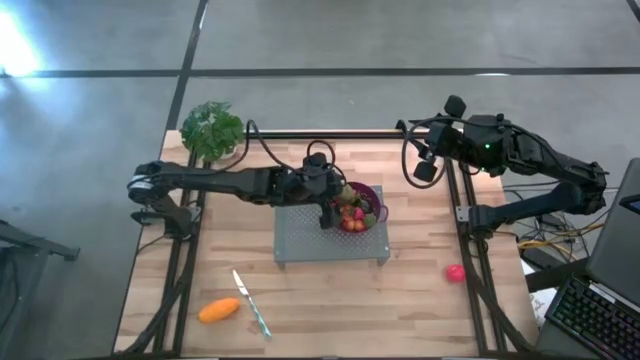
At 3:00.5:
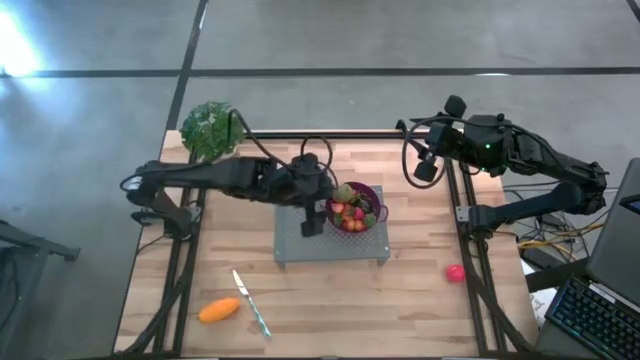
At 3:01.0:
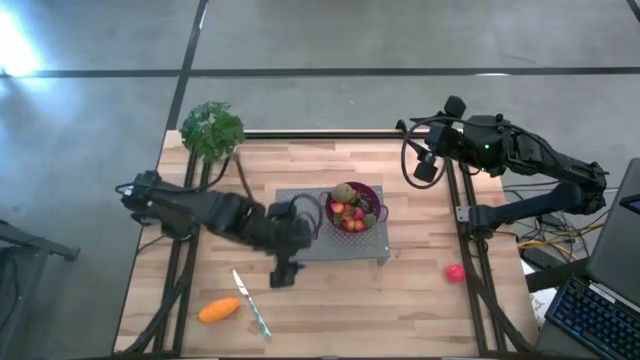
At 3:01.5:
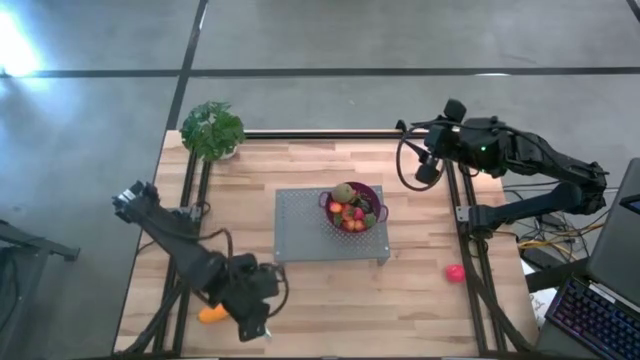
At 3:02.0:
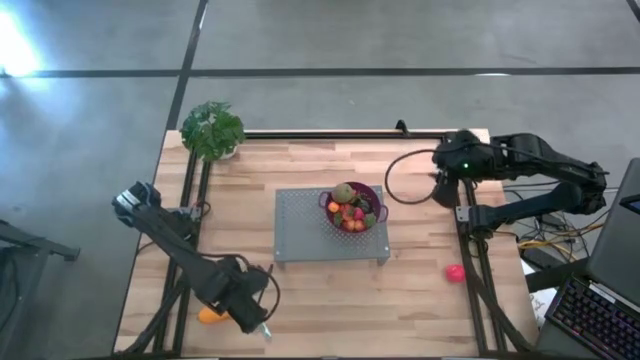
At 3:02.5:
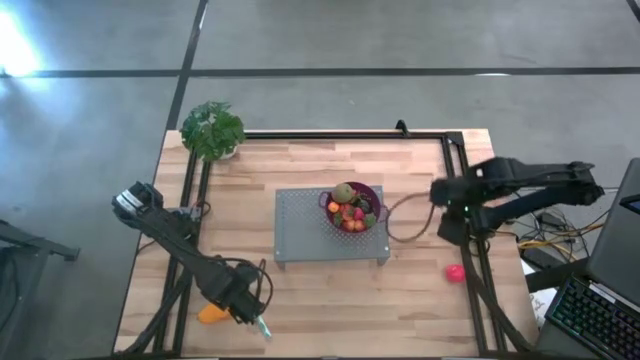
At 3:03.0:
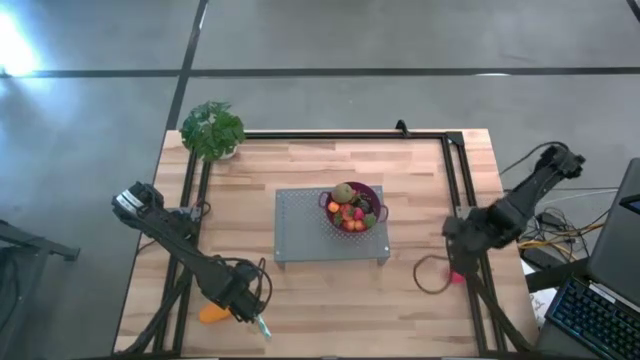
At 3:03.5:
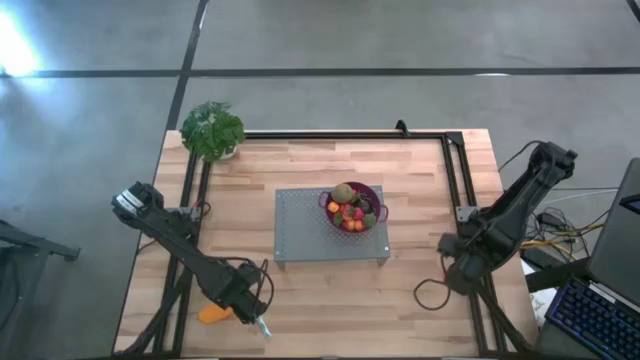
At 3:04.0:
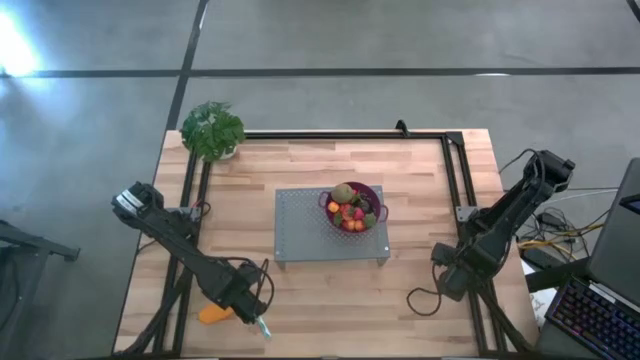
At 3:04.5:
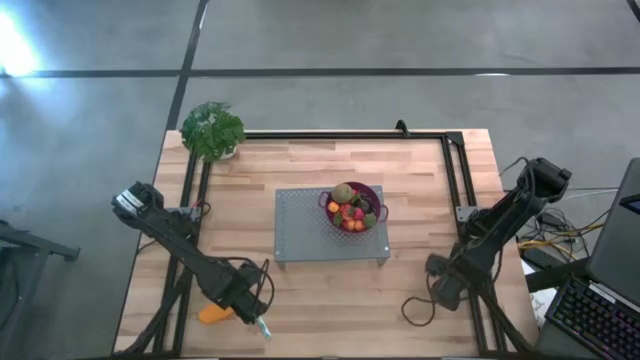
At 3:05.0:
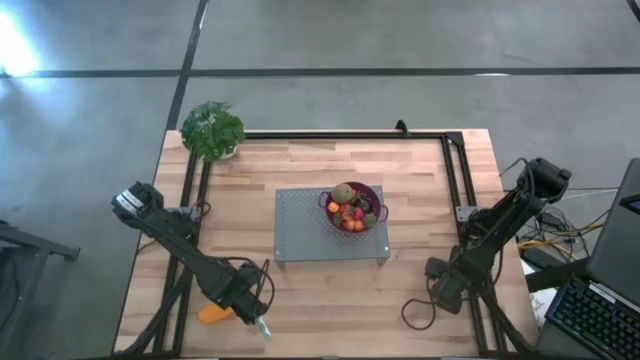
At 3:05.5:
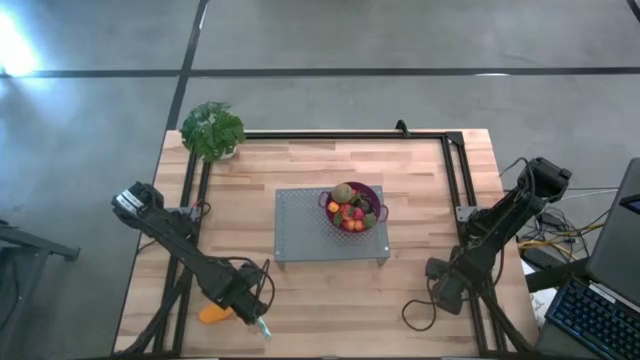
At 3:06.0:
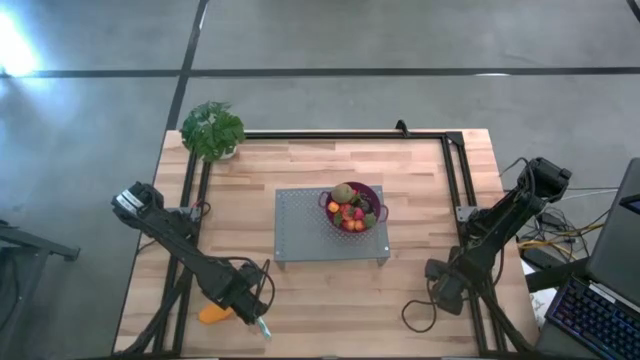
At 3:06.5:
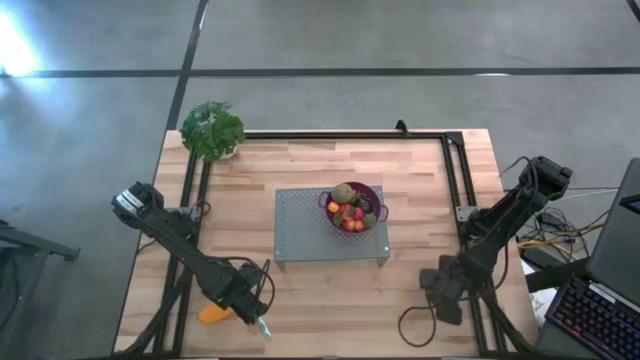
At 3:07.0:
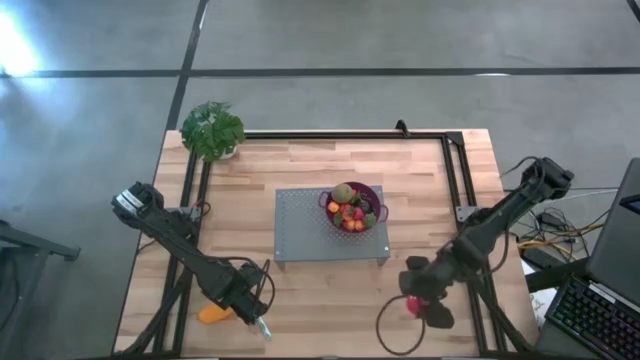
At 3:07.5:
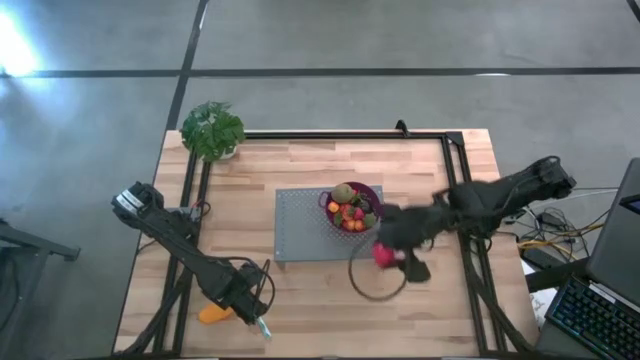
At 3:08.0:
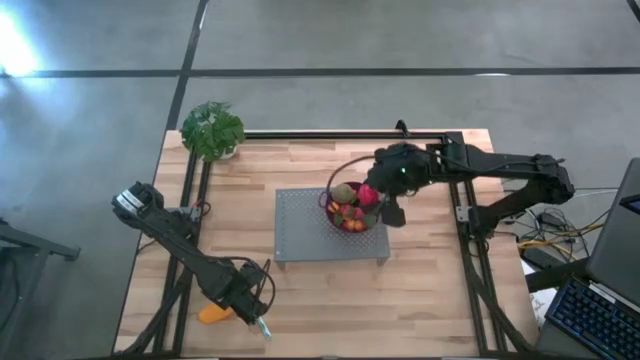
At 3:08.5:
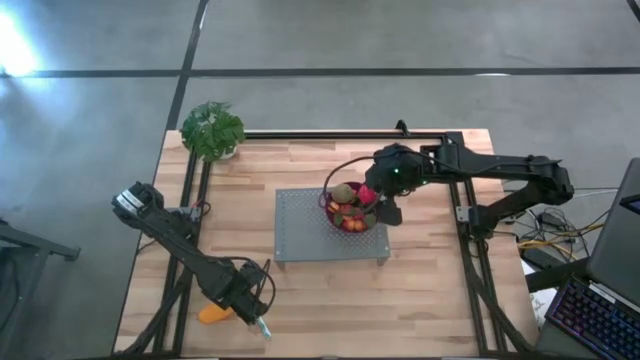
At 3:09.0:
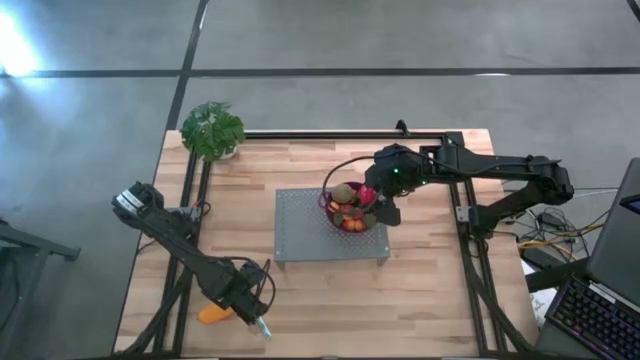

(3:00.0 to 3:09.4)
Task: Pick & Place Fruit
Put the tomato in the purple strainer bowl on the shelf

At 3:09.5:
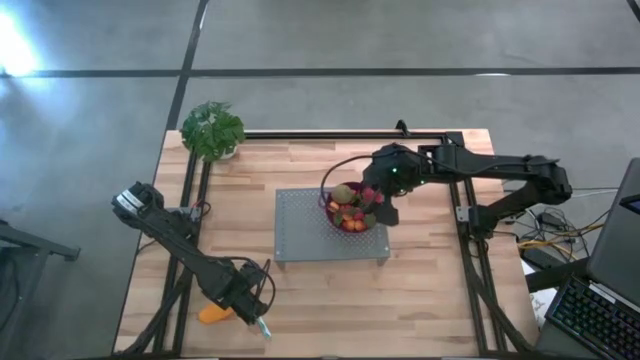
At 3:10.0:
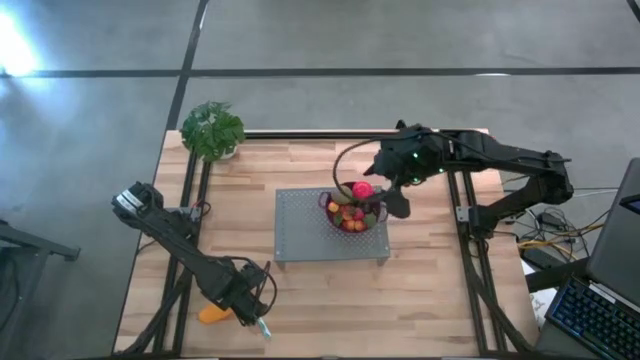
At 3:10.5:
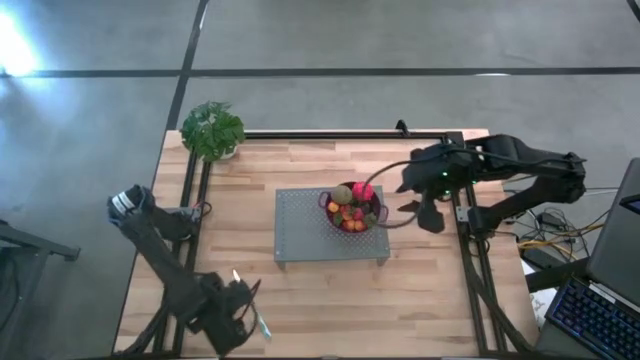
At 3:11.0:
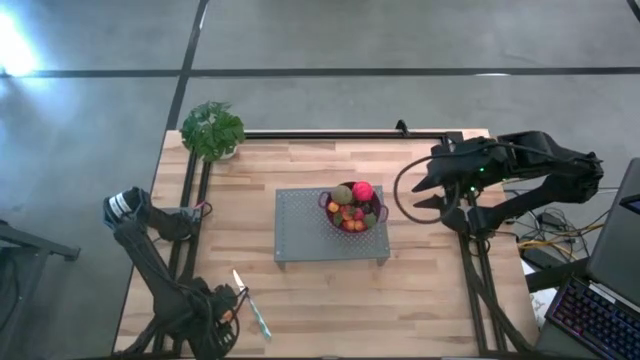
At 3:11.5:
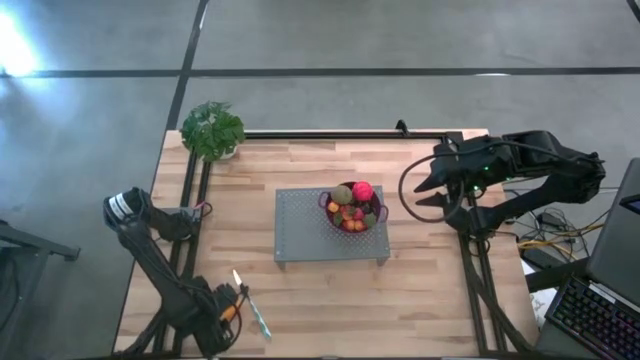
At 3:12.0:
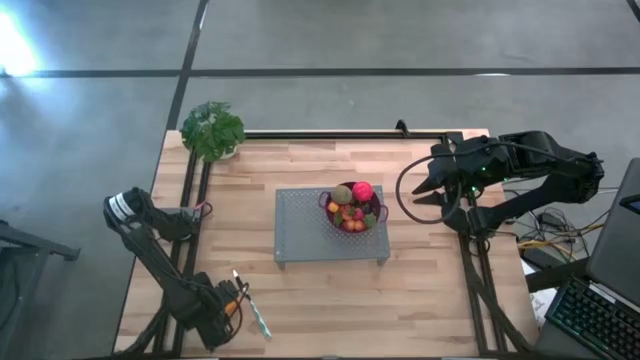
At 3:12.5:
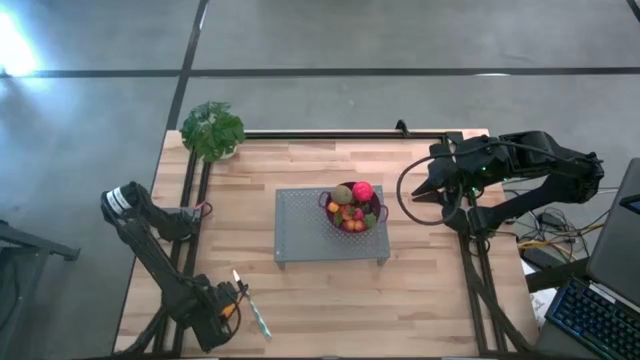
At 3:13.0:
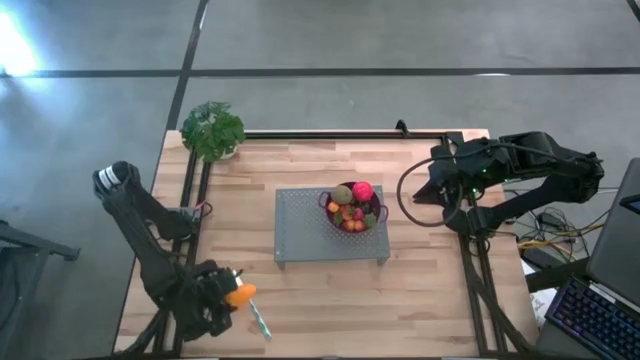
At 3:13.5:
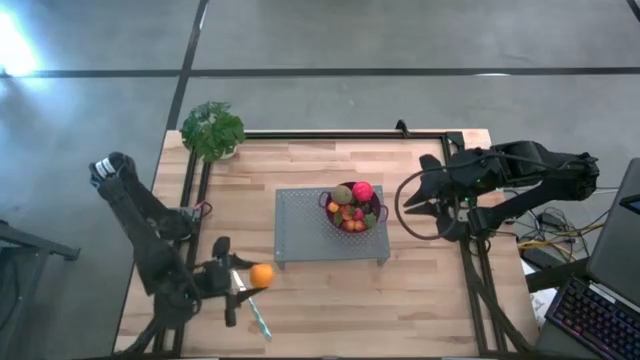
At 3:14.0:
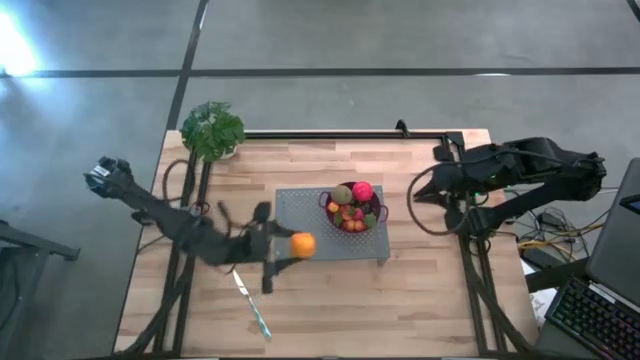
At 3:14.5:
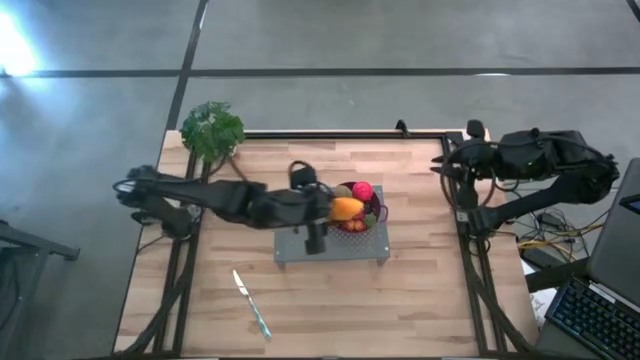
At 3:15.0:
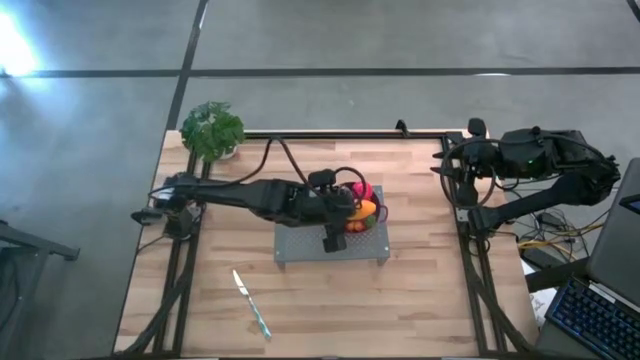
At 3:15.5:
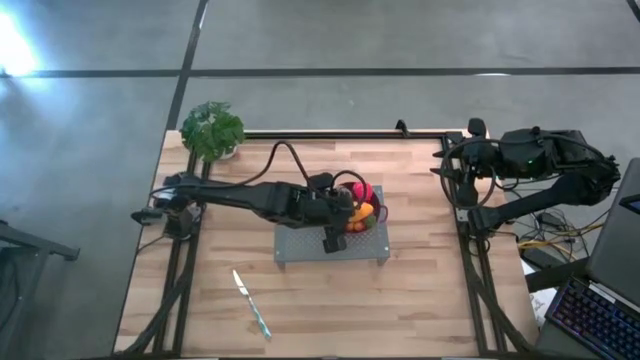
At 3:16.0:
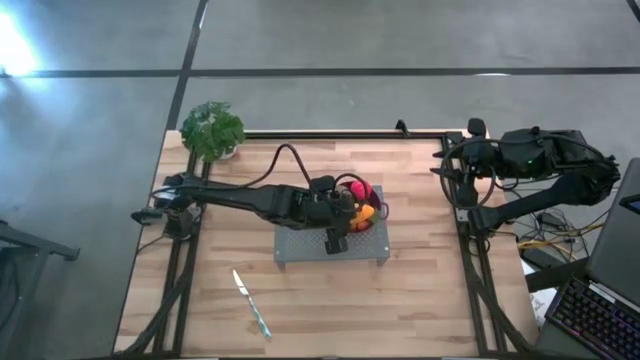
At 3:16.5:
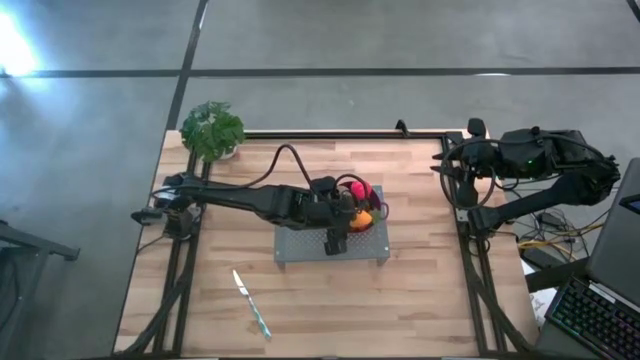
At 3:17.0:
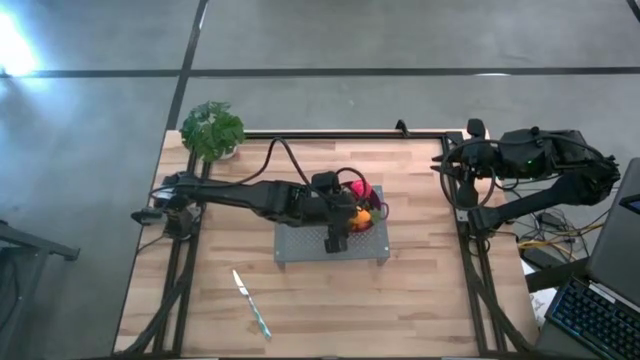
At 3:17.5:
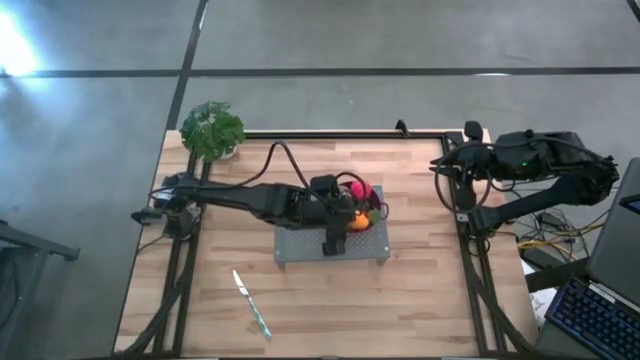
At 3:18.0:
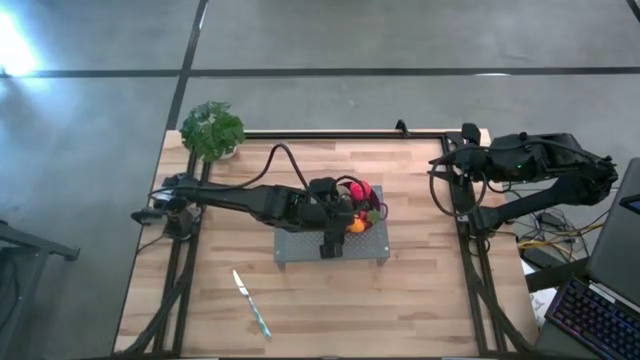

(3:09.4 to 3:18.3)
Put the mango in the purple strainer bowl on the shelf
